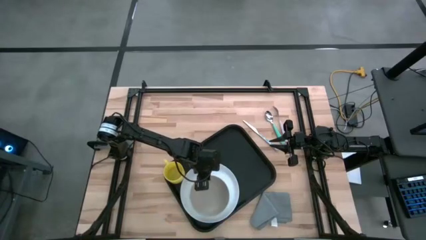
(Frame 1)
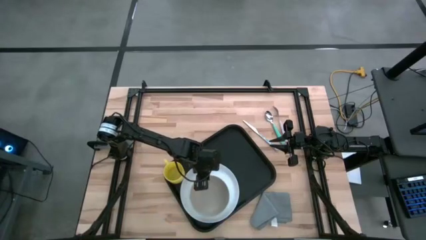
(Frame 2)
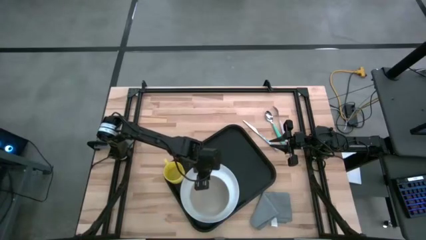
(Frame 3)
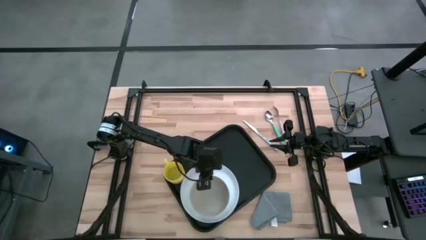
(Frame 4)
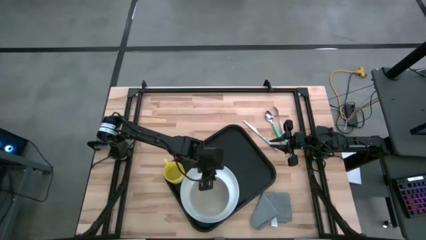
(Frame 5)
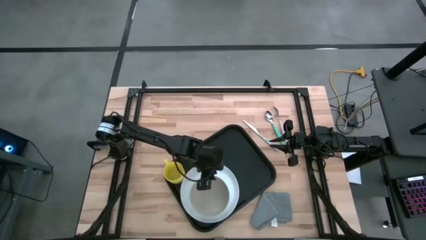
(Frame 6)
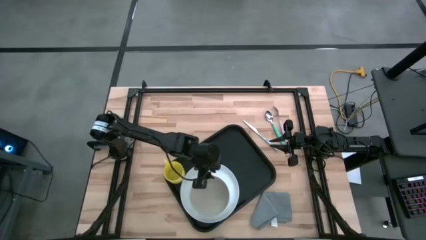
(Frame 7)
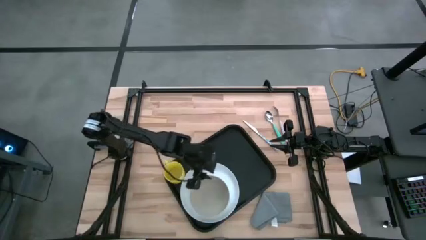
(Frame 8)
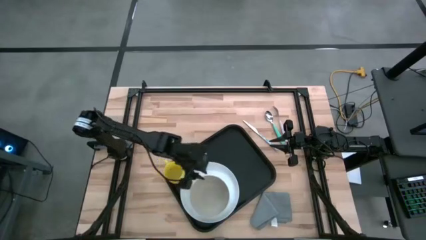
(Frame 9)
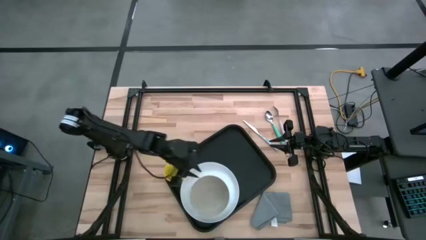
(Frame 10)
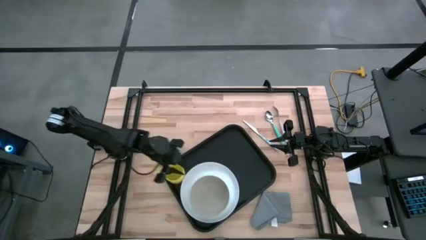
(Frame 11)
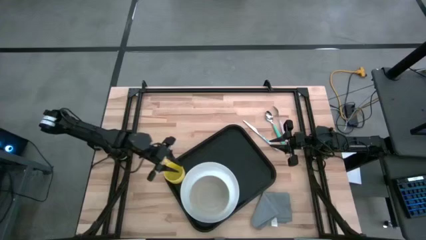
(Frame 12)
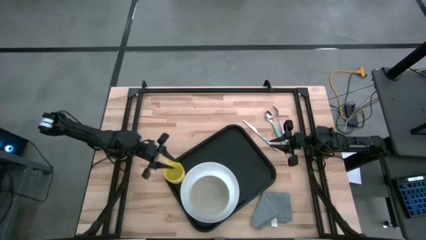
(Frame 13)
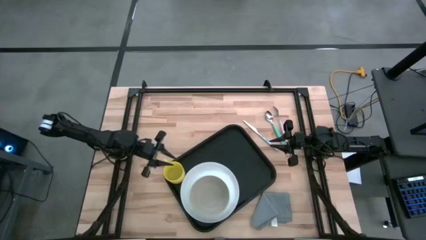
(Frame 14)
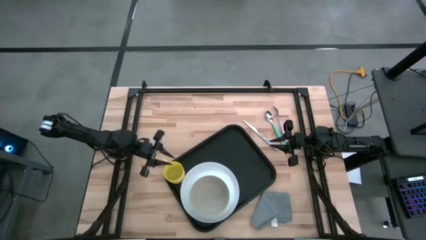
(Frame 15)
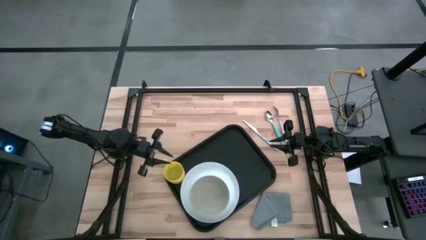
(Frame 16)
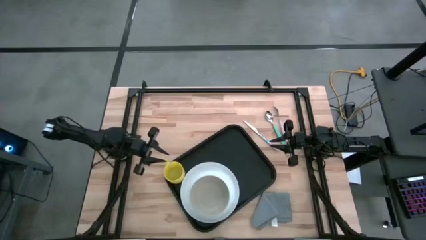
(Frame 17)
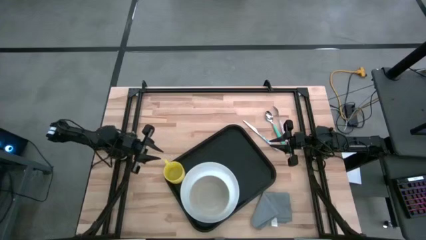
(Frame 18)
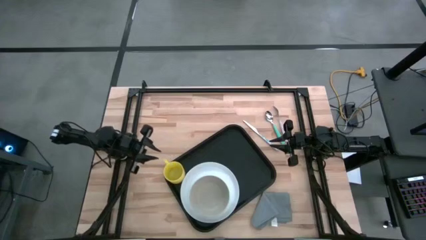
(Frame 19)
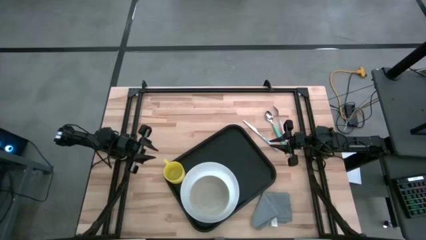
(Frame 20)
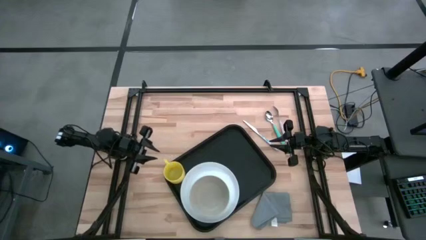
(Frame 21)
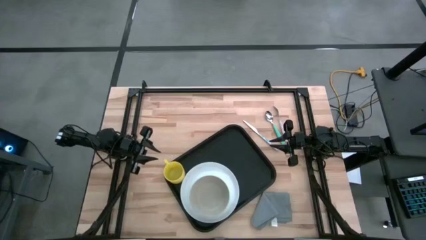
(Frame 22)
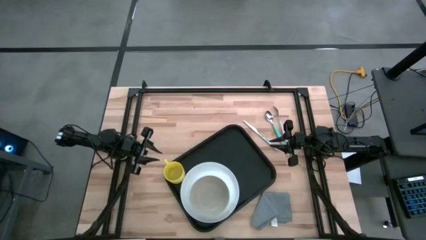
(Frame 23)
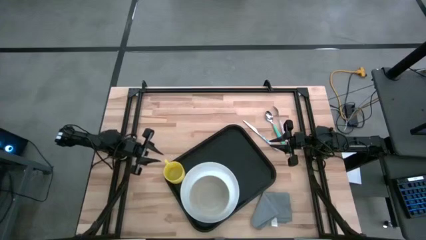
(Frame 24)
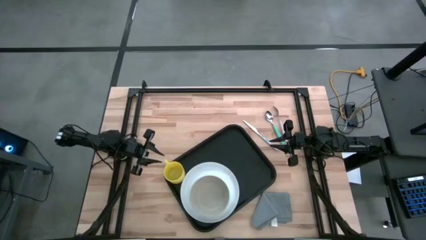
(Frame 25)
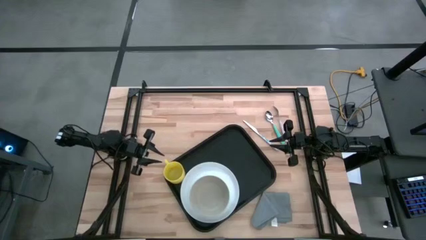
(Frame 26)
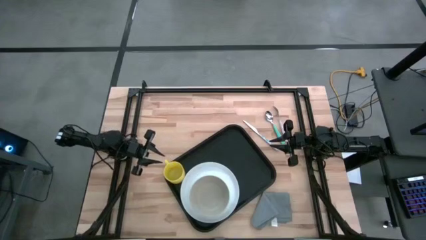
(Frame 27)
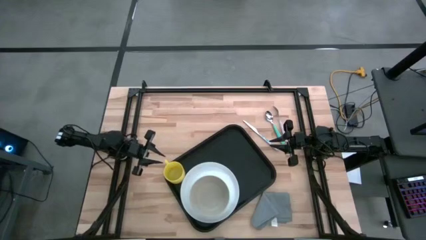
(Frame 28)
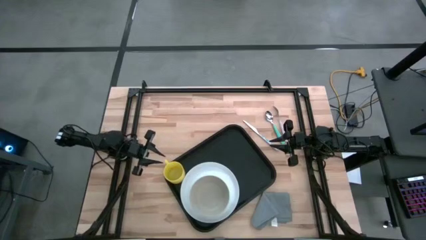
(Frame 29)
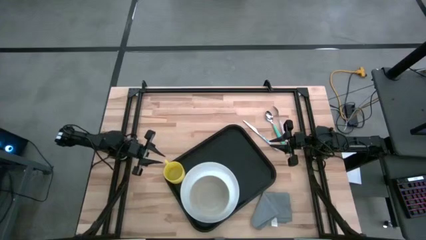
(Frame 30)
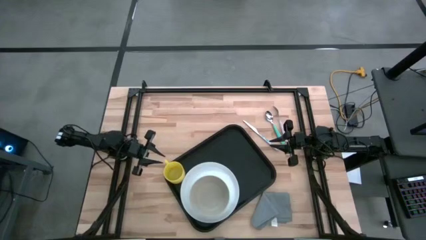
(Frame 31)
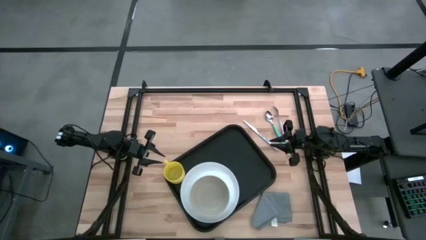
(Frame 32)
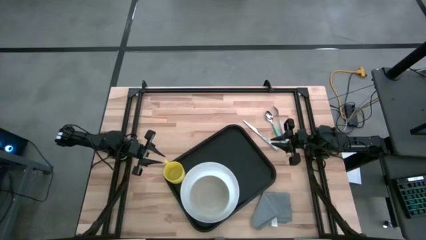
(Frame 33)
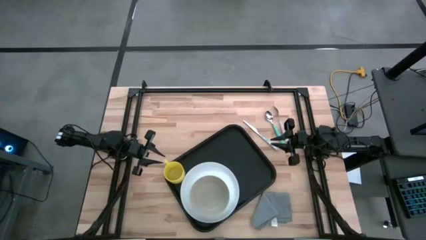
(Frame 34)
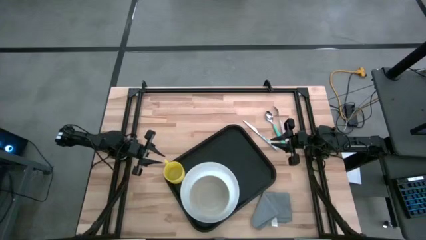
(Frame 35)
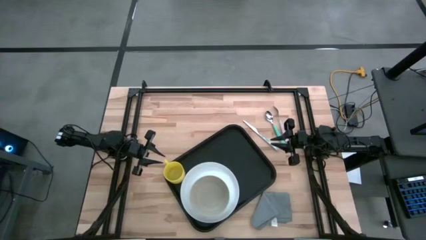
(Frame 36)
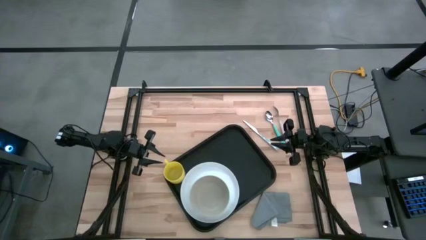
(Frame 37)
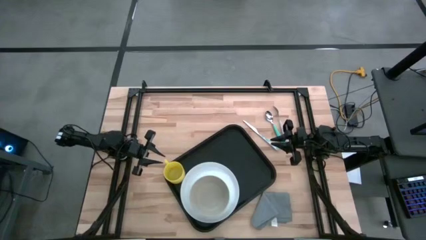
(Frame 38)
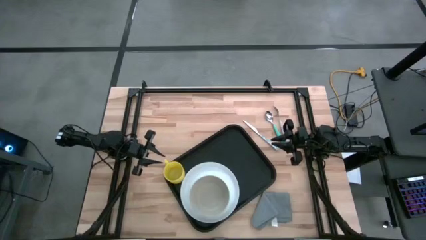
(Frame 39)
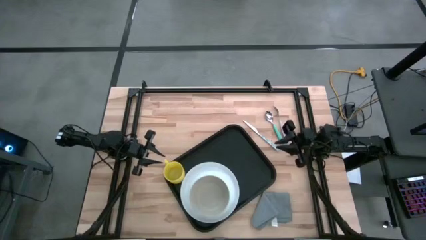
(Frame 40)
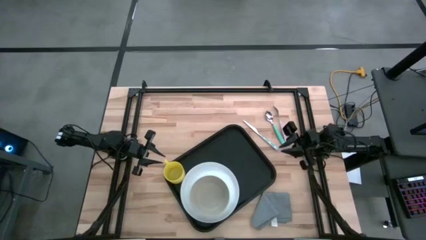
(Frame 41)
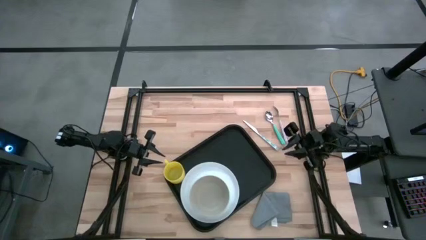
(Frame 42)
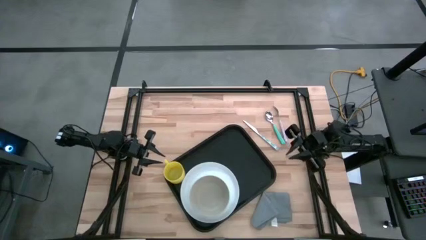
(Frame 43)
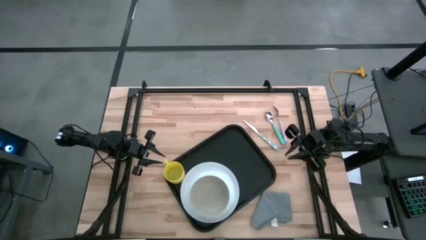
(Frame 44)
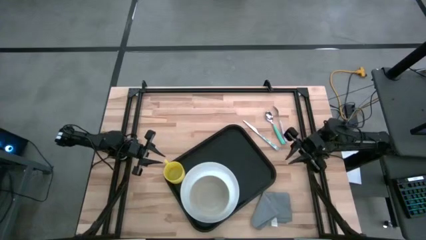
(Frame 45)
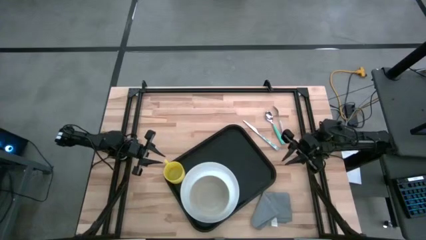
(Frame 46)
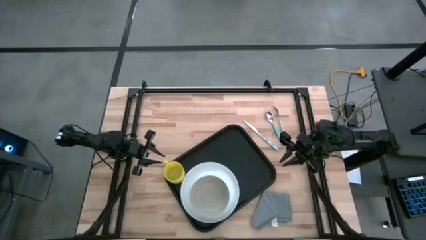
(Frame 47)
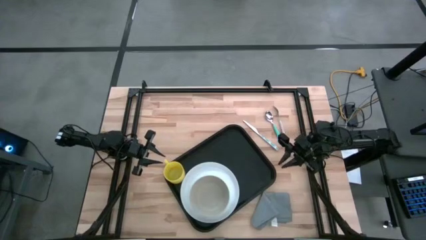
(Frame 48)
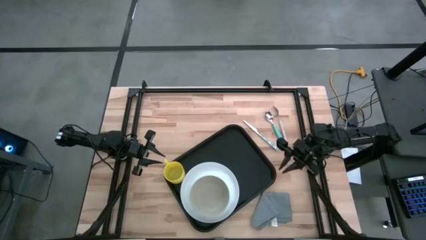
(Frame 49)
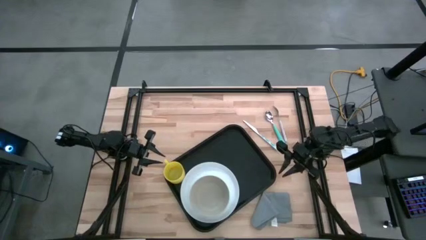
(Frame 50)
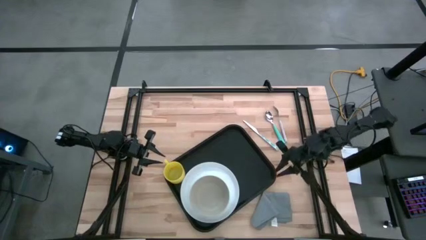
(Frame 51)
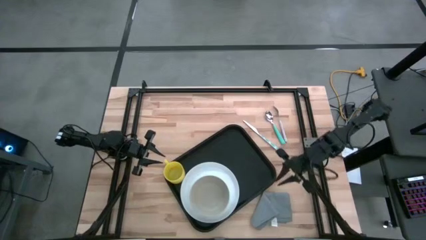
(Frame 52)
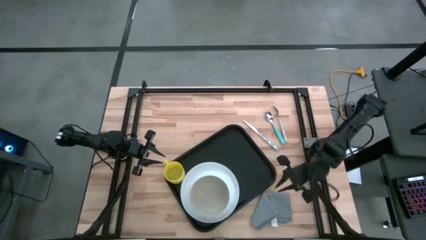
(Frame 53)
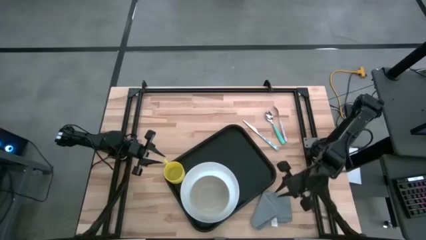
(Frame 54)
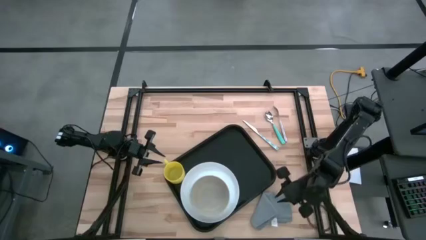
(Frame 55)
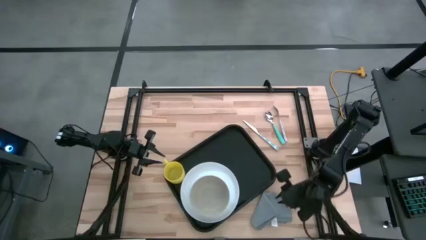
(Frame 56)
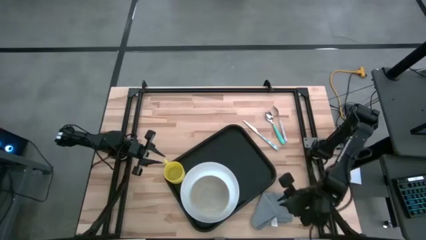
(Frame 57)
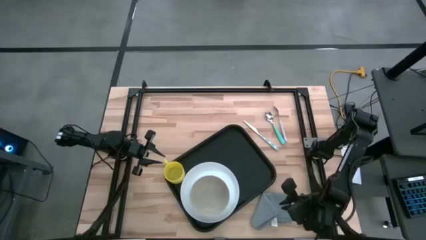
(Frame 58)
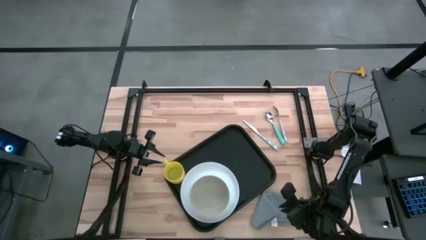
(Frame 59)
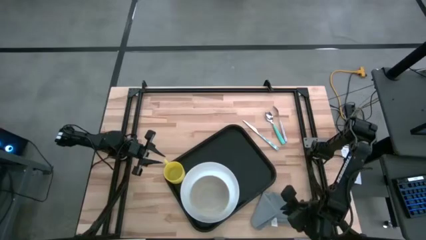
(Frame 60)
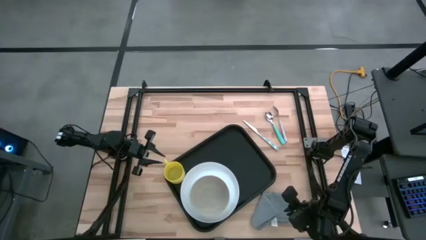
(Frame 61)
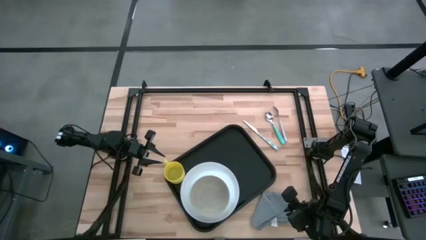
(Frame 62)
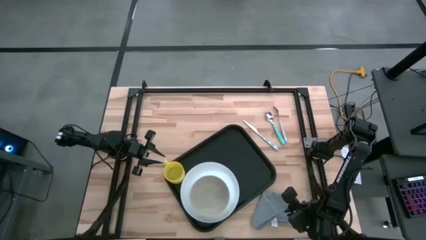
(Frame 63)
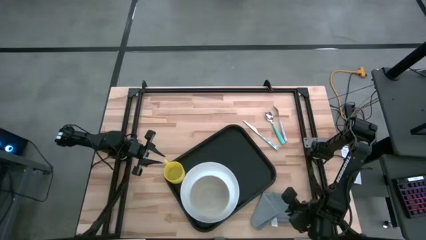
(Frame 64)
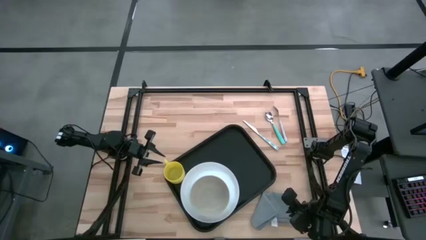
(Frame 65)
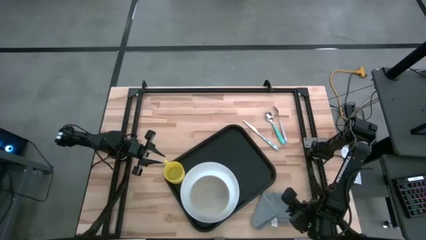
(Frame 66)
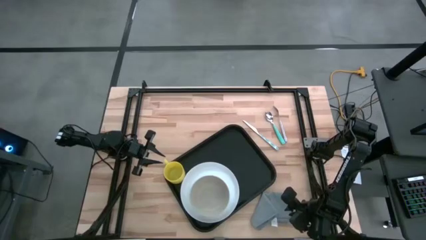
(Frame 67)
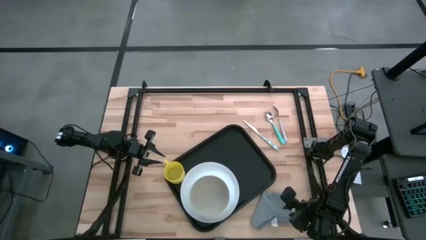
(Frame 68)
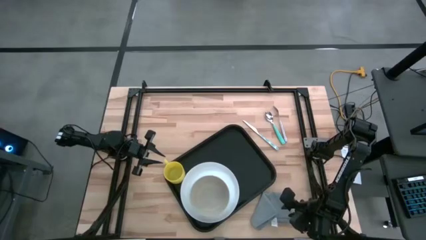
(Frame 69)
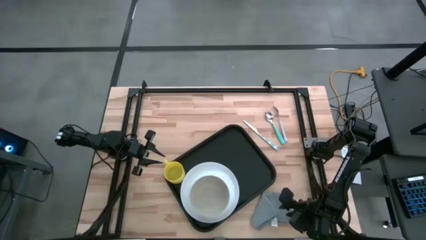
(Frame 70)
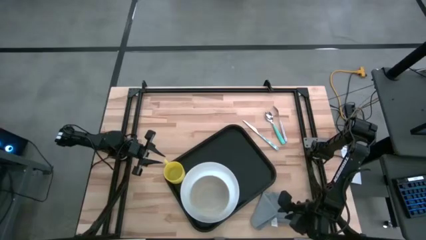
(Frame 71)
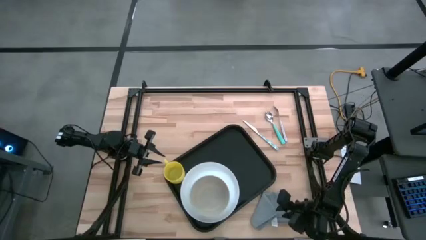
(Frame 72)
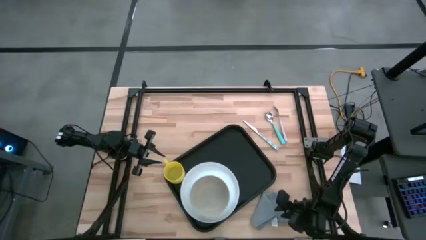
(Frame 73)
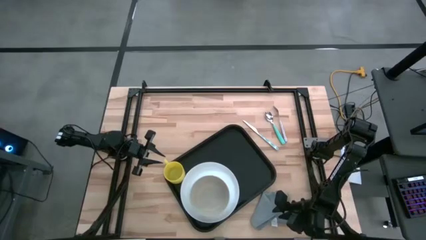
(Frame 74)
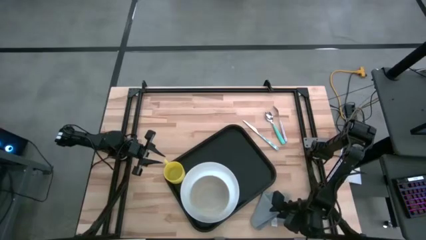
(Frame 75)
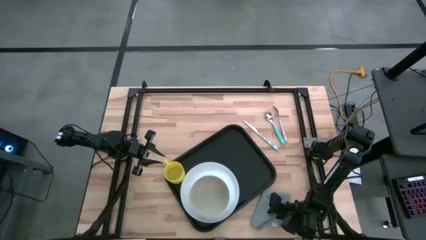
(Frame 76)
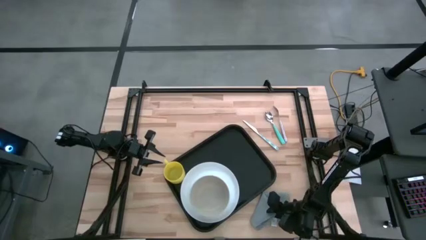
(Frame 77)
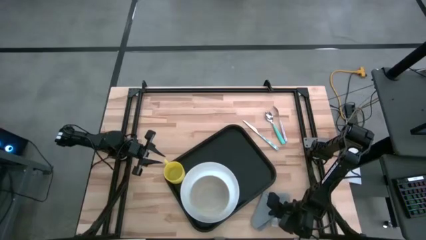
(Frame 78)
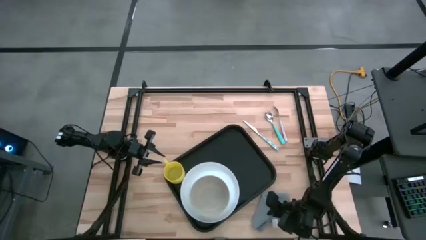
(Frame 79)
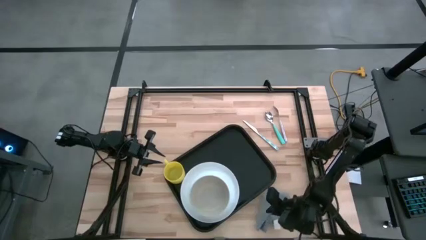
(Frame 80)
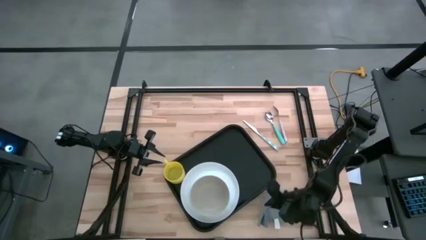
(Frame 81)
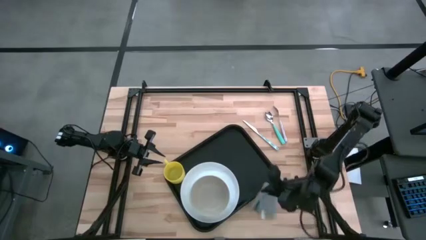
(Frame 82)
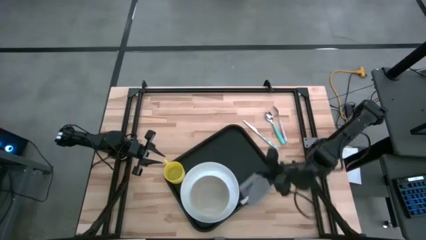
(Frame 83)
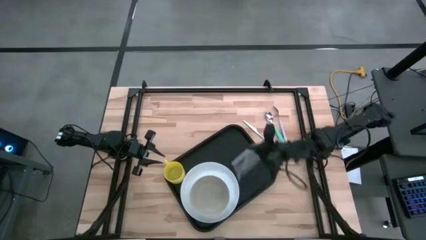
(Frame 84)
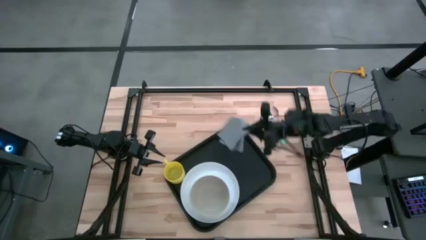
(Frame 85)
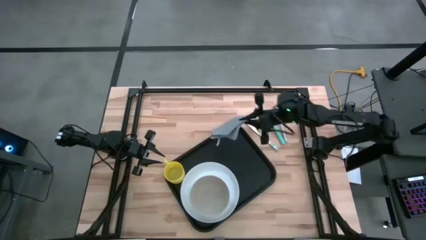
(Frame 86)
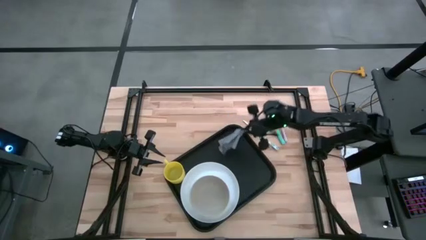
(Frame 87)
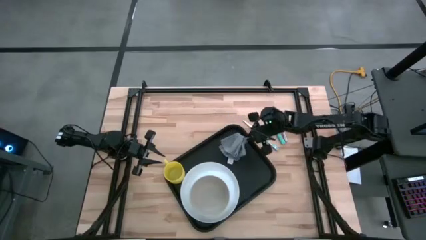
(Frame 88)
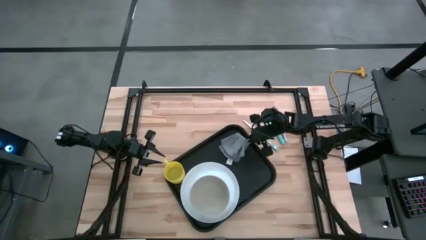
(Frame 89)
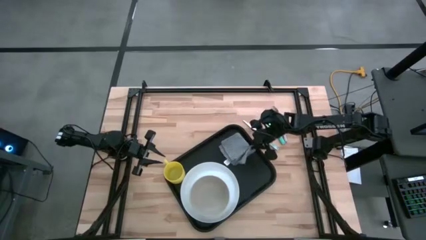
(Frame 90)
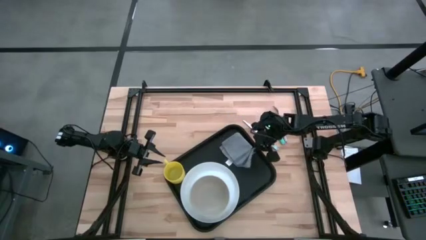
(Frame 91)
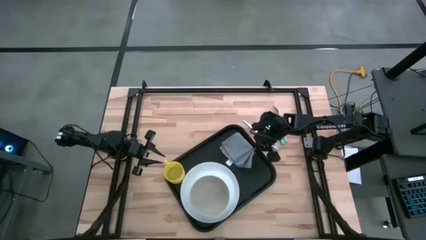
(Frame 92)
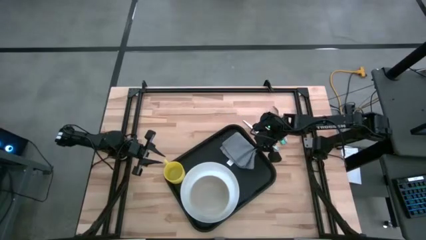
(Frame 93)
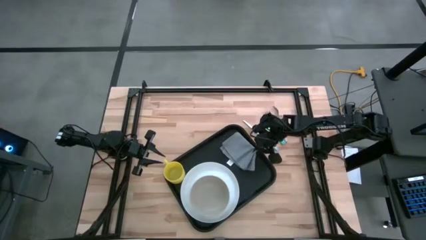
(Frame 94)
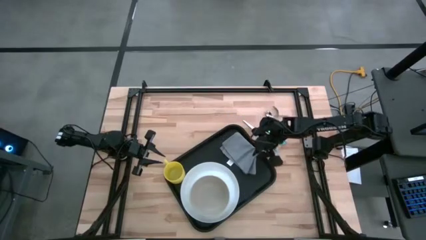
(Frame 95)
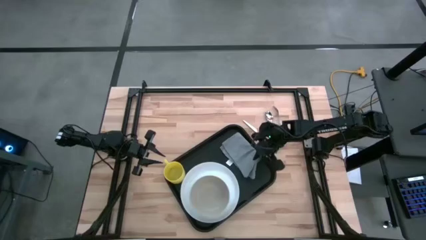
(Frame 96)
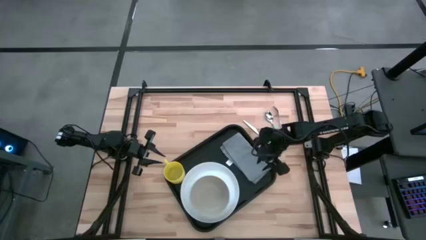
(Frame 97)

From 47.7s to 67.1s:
Task: Set up tray
Put the gray napkin on the black serving tray
